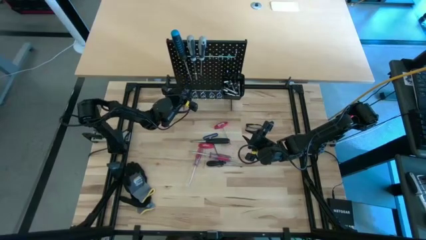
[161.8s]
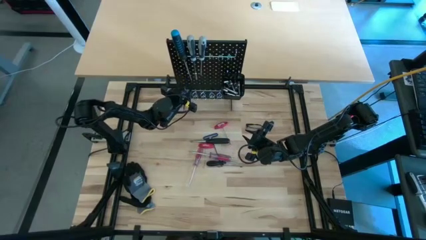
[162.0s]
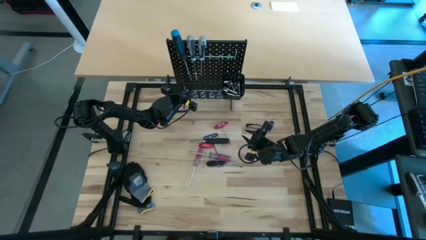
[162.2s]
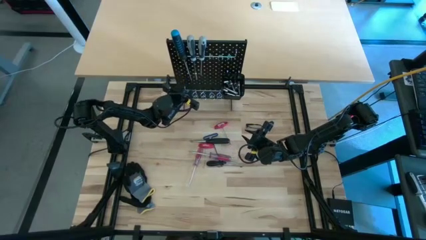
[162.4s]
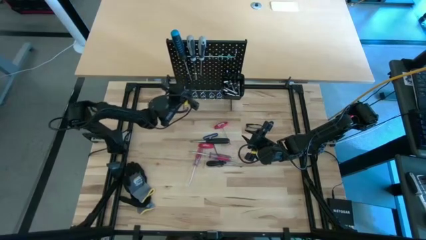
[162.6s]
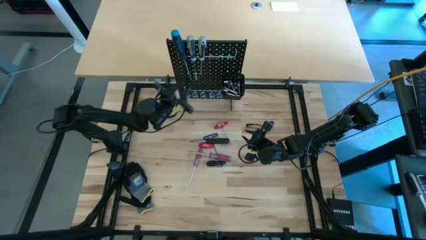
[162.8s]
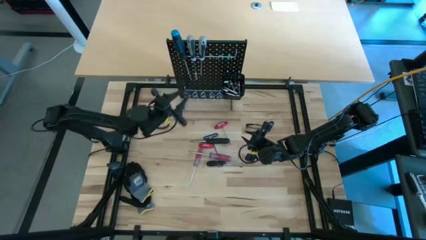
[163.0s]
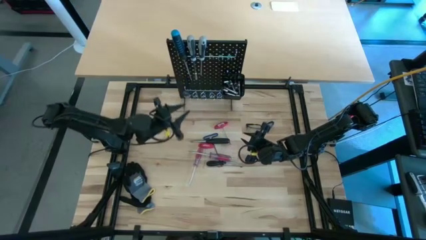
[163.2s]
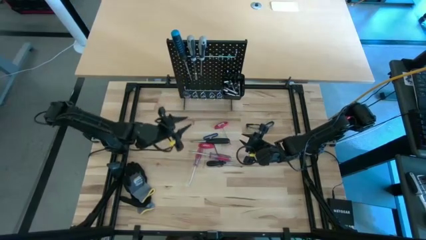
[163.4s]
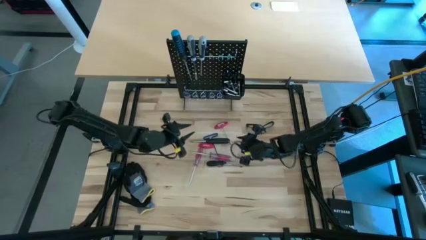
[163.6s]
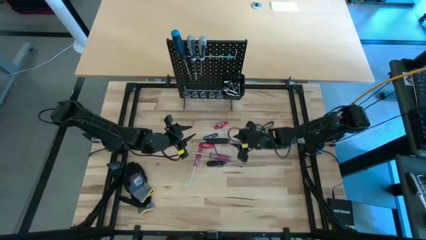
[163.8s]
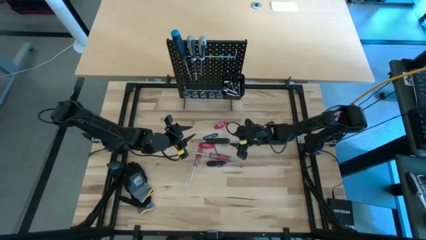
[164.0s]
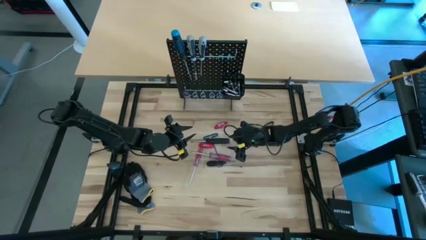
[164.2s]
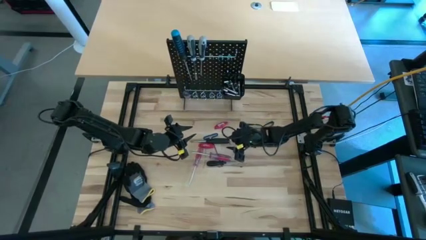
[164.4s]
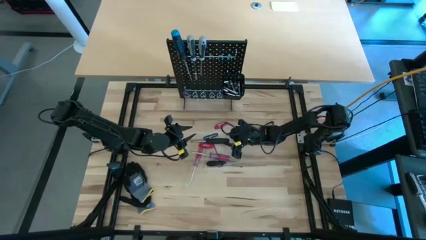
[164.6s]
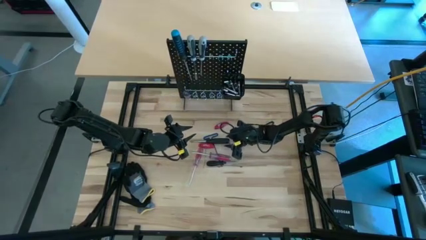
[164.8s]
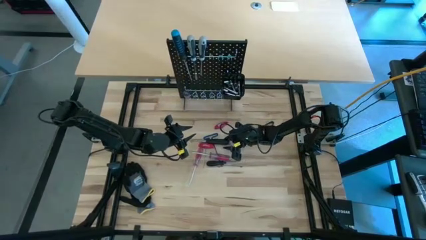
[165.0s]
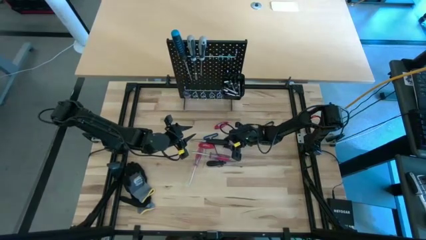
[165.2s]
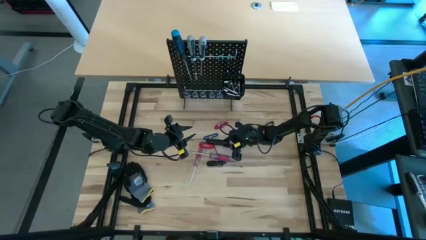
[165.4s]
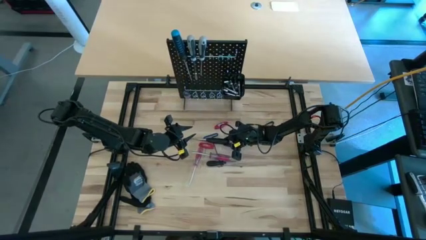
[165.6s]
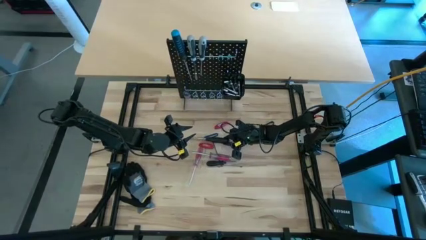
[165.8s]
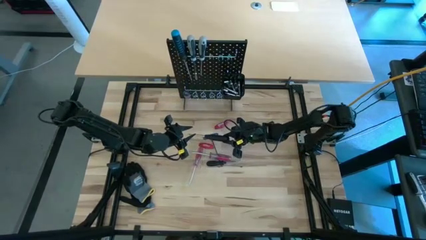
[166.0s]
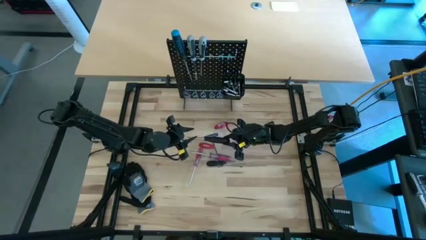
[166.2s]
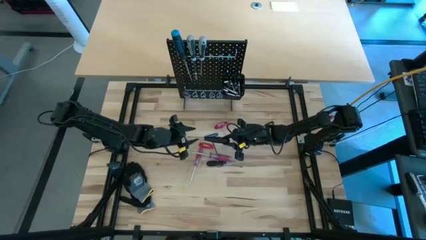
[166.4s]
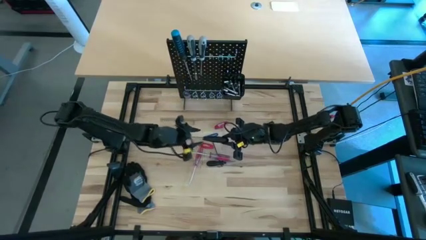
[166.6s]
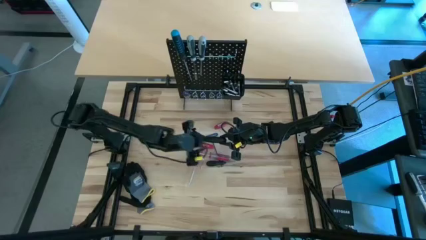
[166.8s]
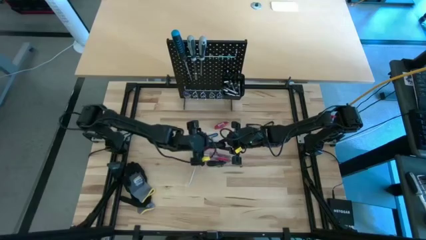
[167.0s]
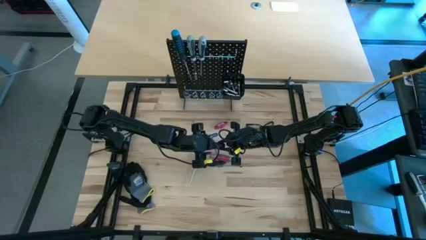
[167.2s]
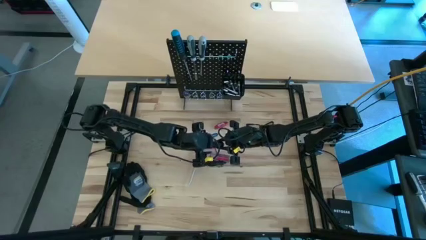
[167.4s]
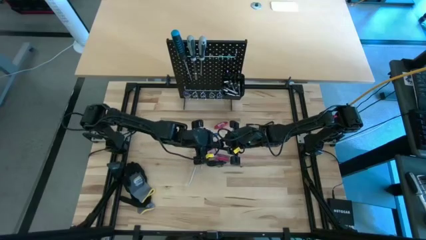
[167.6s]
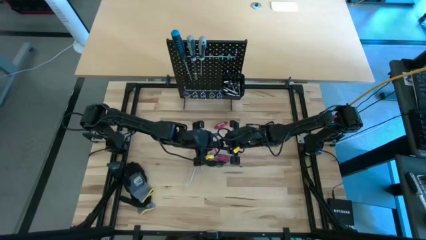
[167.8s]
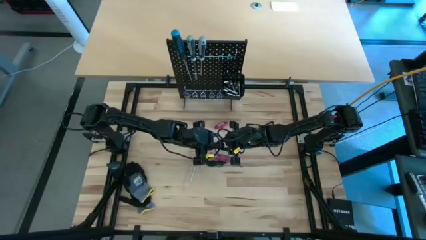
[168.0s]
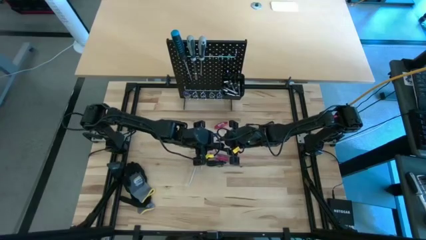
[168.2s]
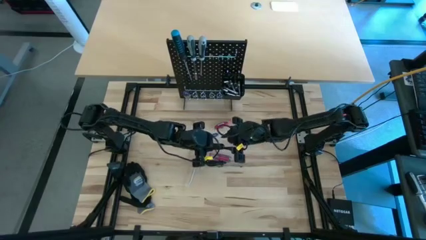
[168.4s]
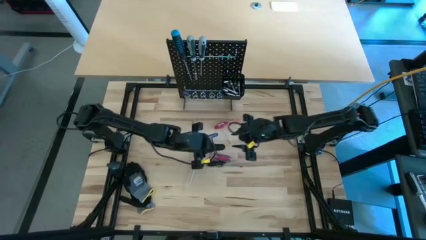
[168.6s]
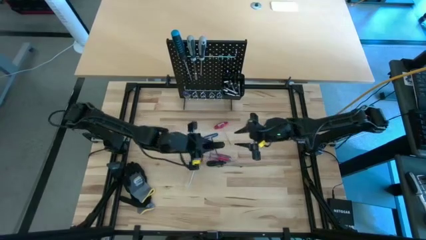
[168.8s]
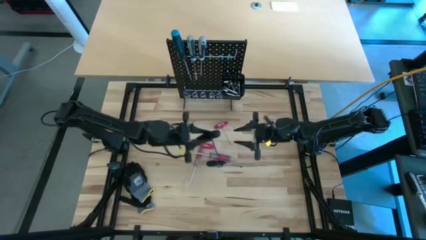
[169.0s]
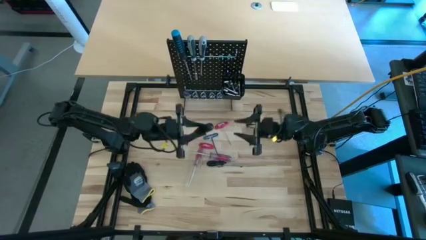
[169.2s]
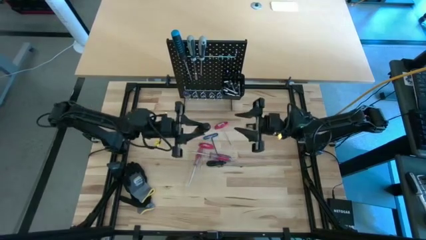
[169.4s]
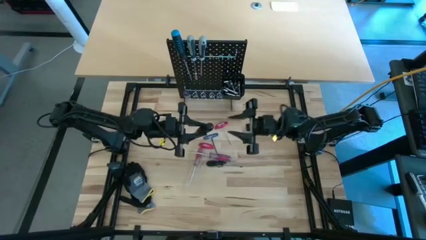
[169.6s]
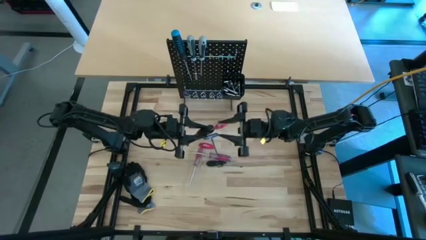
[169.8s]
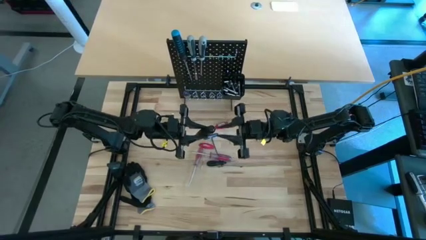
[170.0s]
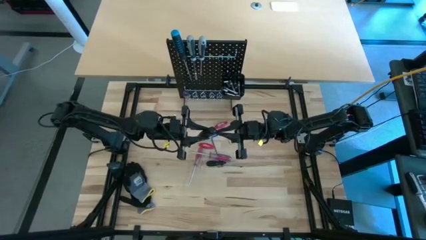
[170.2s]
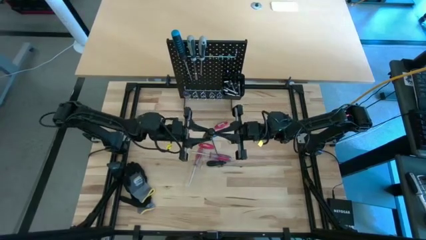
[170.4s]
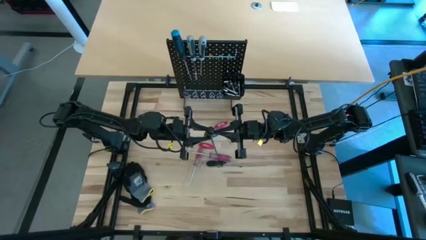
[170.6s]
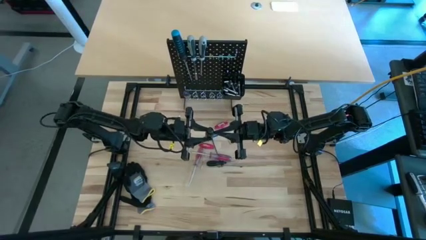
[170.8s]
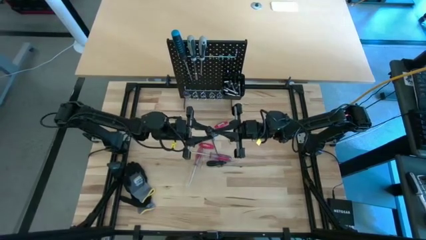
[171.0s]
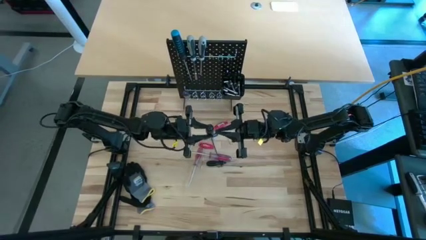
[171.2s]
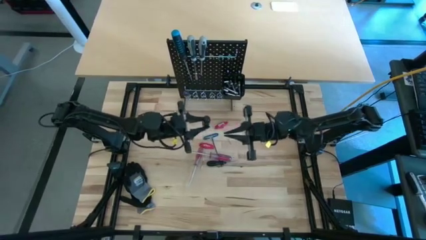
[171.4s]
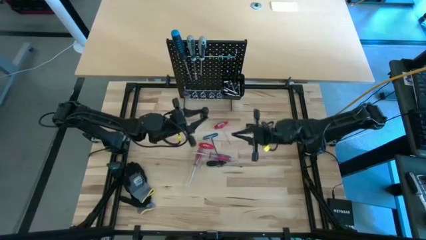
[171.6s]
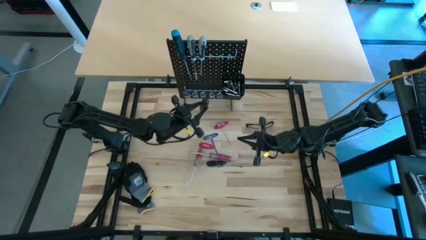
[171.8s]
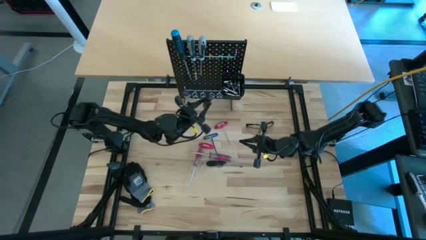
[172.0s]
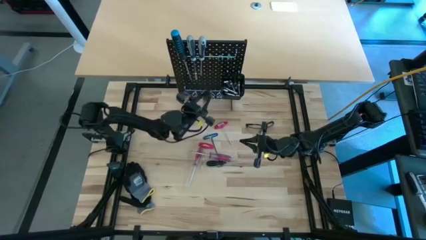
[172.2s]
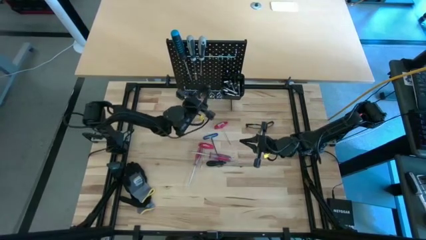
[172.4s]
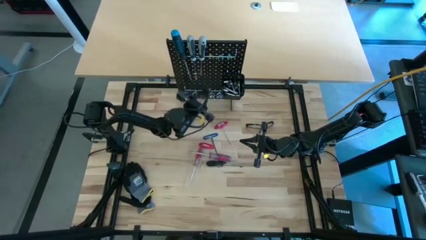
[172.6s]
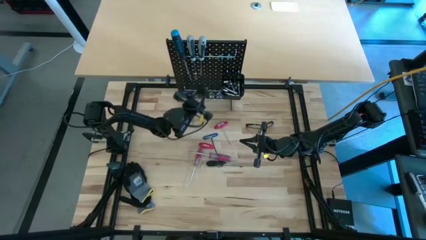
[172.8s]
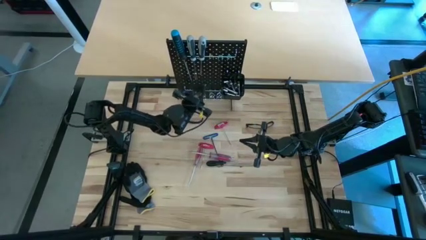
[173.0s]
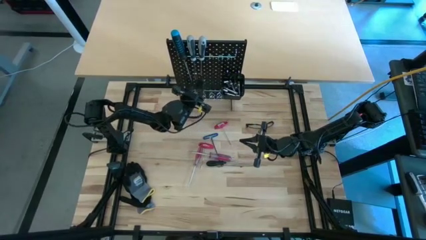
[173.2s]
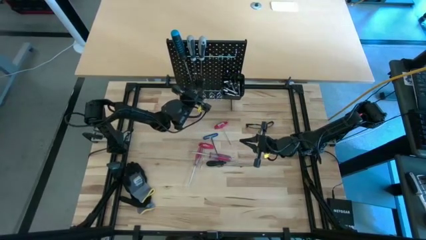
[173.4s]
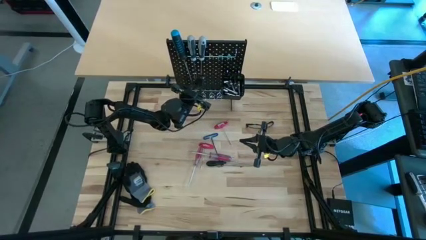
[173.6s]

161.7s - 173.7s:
Task: Hang tools onto peg board
Hang the black screwdriver on the peg board
